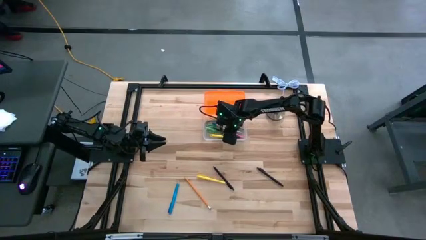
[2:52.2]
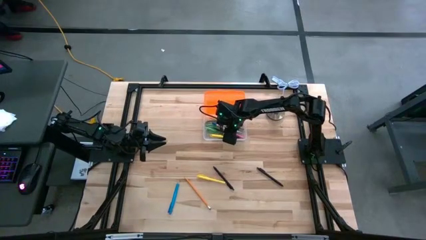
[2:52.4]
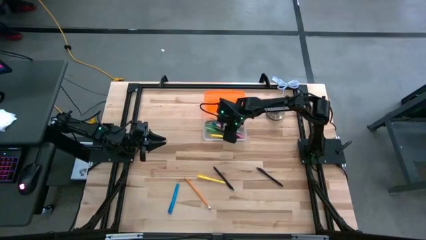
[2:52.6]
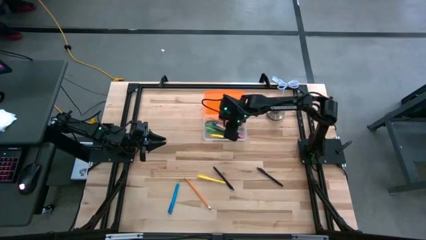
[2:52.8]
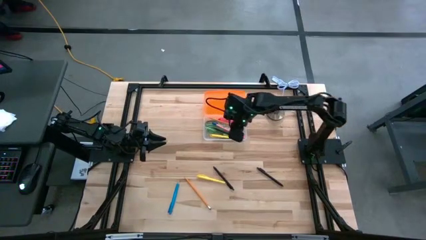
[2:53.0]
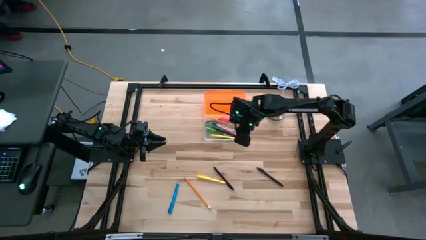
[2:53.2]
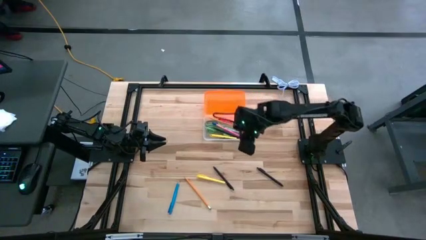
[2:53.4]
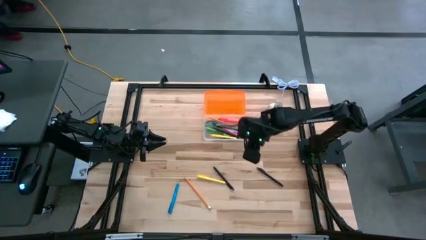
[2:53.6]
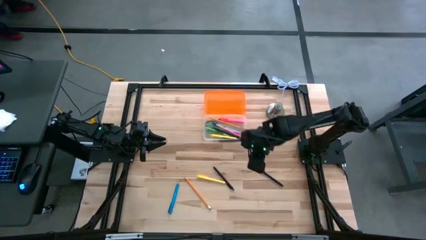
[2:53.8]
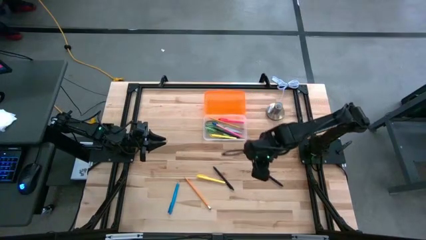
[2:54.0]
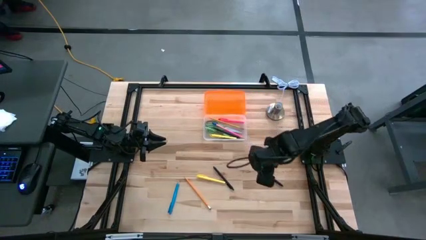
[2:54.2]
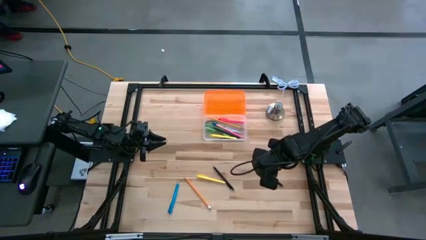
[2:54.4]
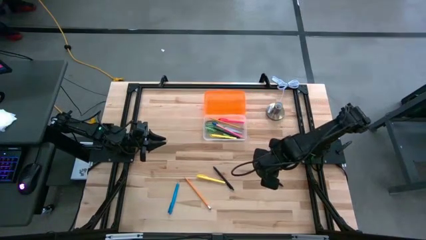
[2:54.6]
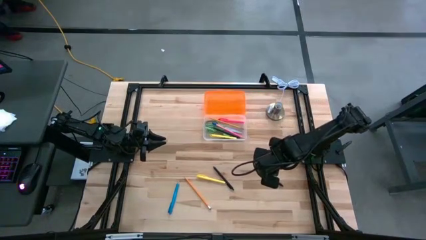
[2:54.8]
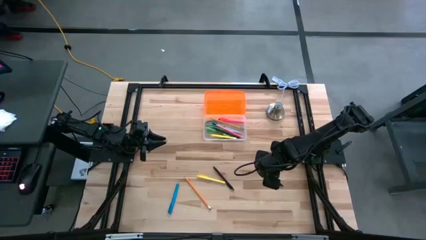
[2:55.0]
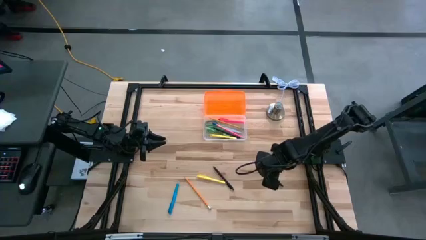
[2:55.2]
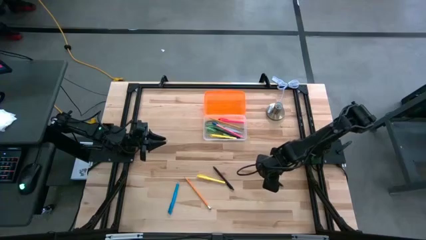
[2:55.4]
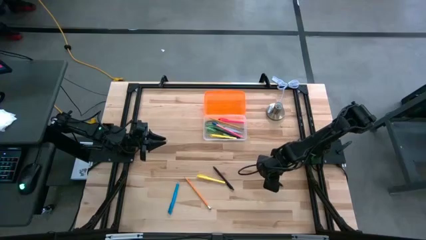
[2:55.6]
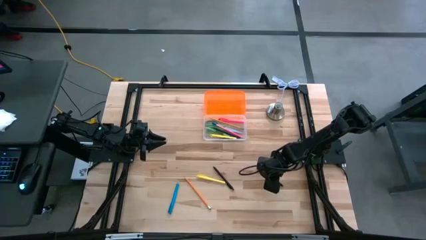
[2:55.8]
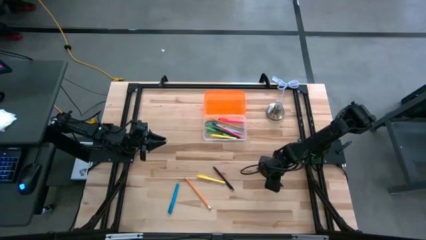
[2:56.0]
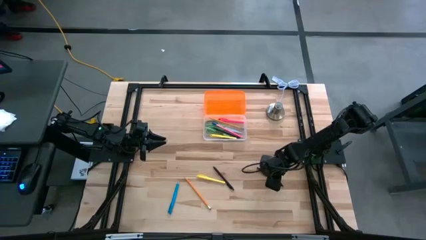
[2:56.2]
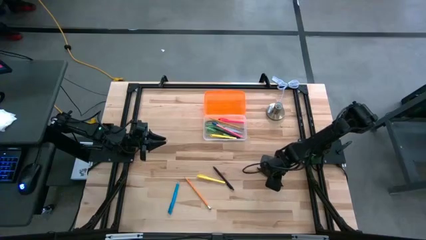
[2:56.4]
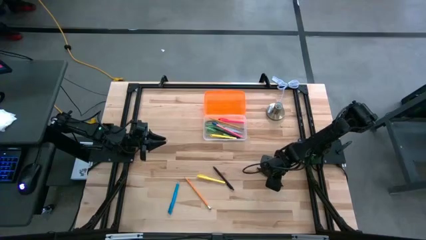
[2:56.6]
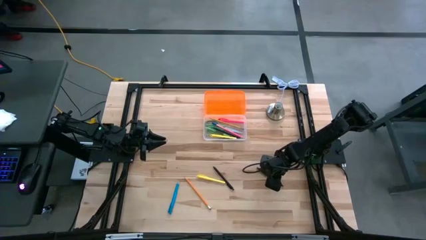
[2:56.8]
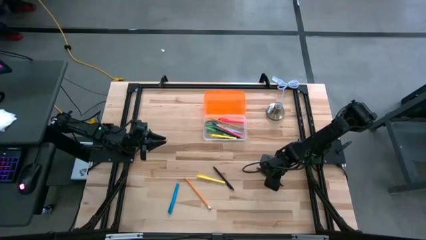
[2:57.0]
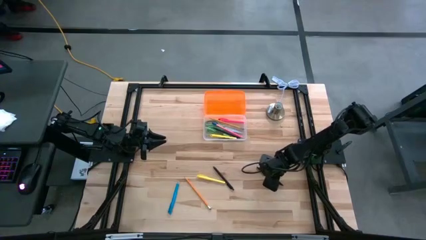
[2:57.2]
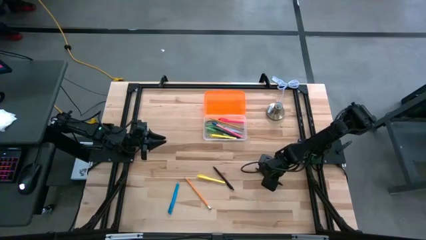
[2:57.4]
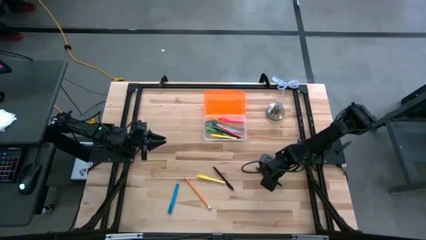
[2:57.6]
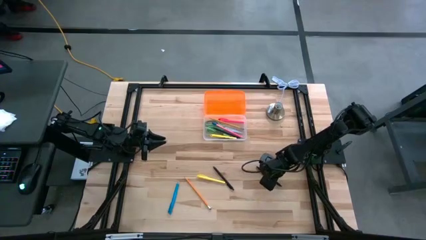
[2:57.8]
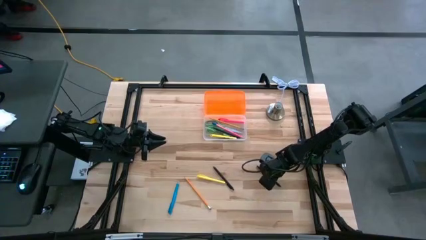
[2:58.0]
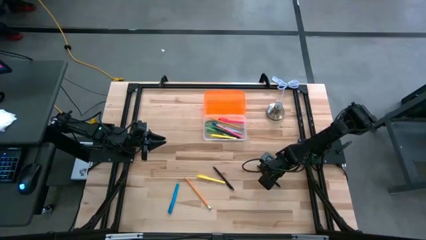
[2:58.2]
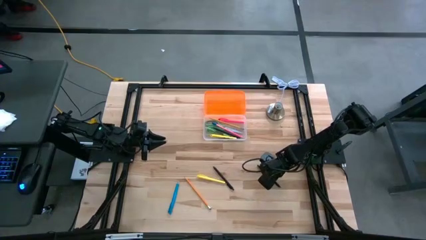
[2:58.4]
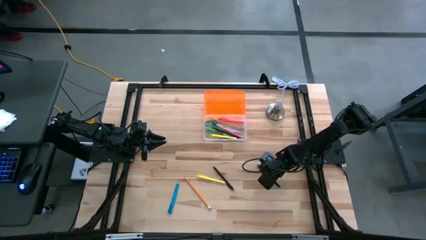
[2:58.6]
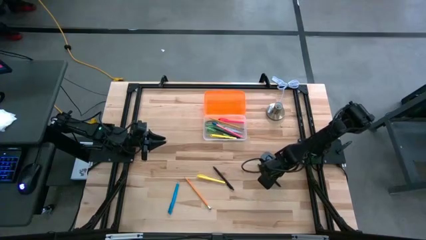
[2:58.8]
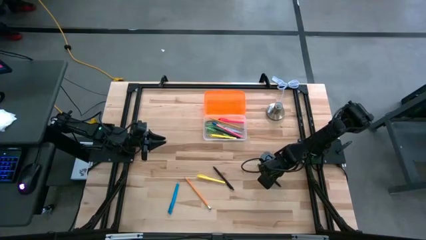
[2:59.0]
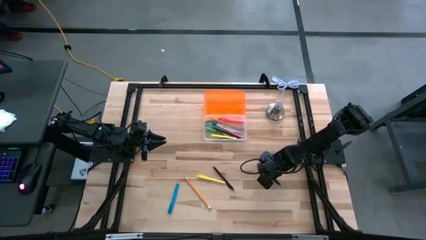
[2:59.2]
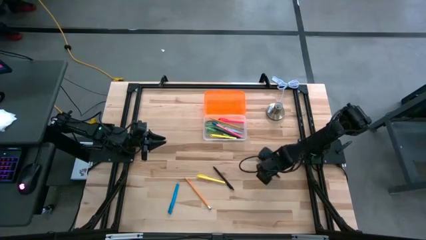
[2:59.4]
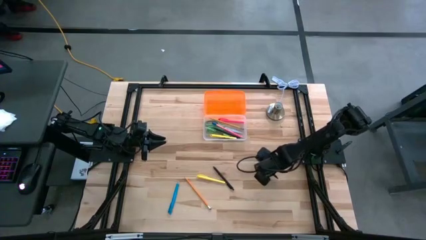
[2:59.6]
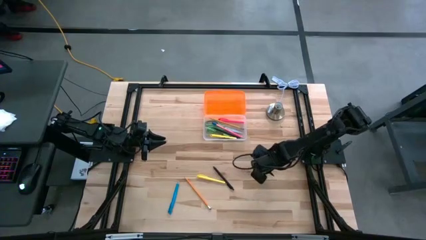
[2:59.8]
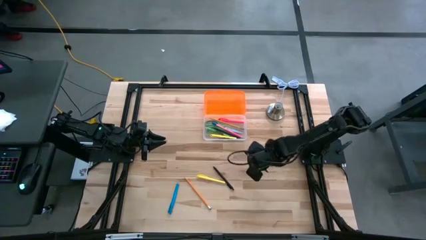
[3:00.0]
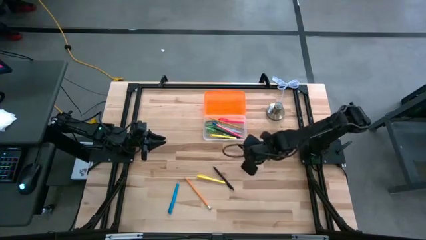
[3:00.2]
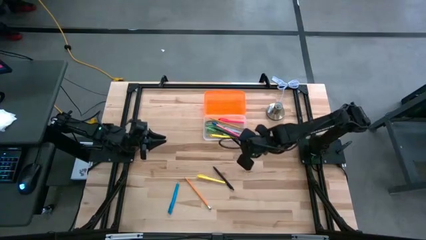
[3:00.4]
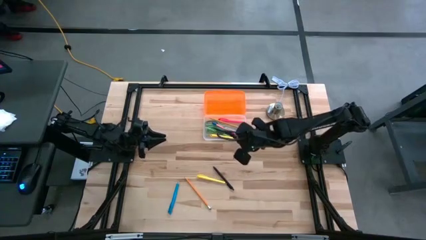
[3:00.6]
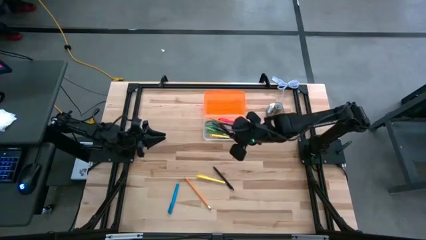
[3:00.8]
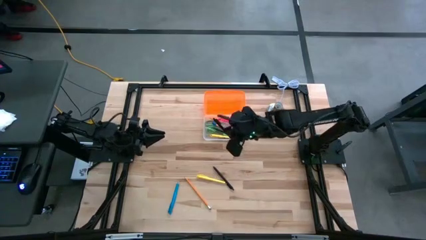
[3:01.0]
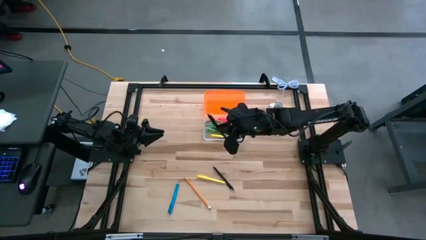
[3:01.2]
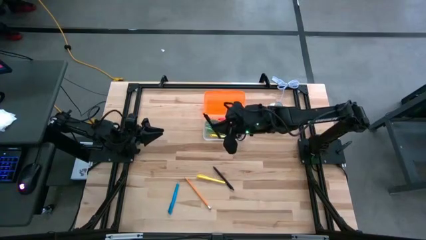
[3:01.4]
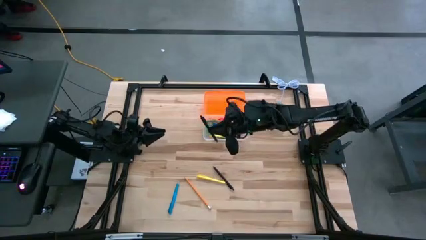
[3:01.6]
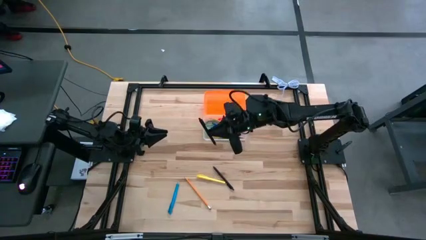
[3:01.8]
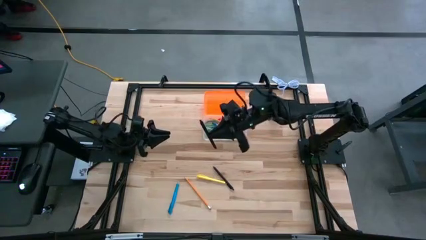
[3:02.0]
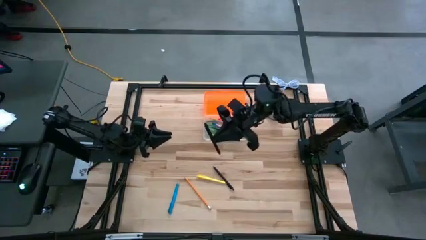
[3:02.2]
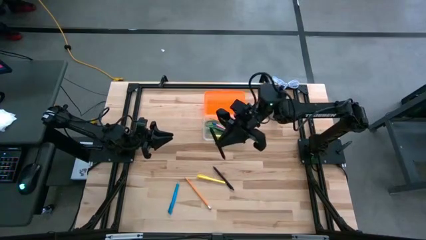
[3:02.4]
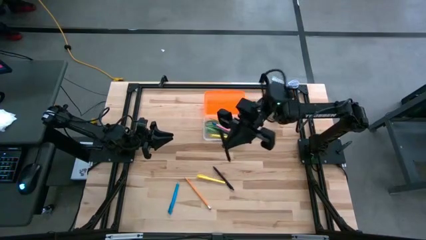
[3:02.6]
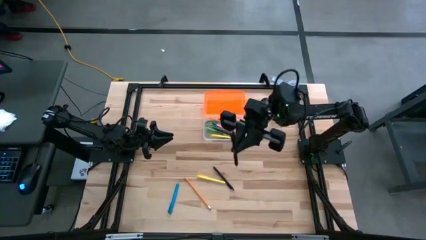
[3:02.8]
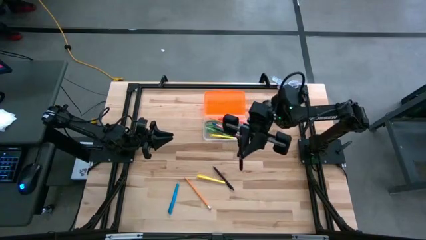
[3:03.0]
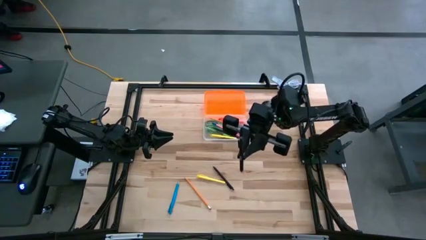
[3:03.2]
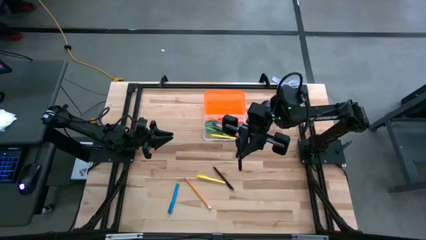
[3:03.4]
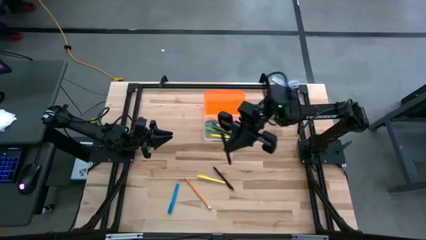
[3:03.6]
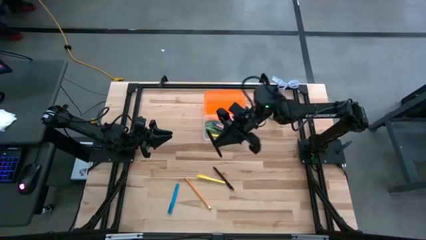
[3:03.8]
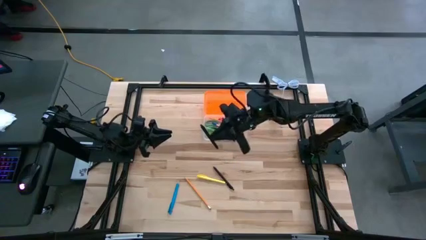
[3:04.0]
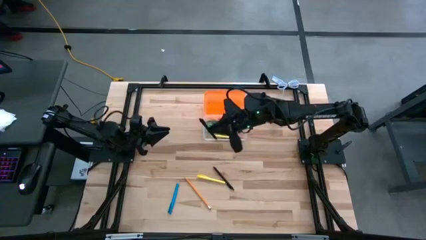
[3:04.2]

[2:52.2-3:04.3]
Task: Pick & place school supplies into a supply box
Put the right black pen into the supply box

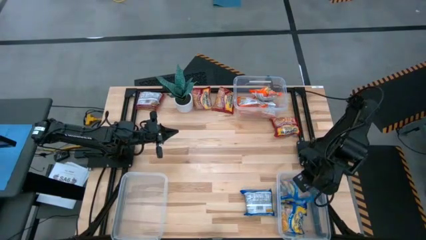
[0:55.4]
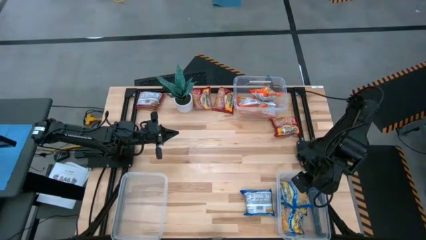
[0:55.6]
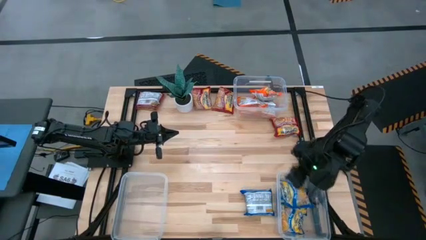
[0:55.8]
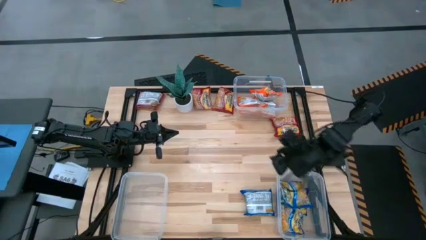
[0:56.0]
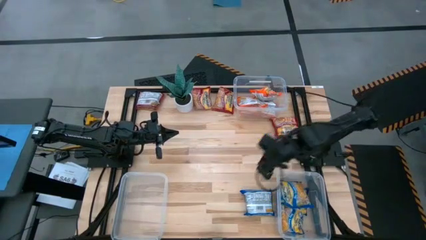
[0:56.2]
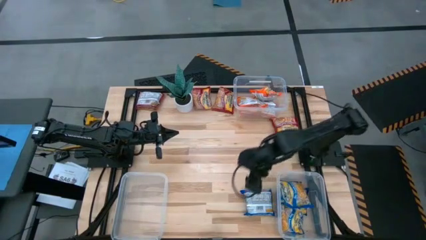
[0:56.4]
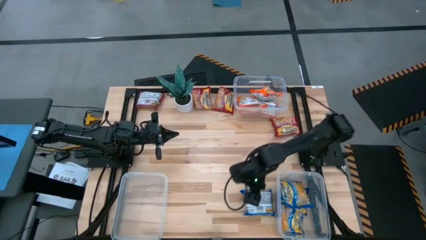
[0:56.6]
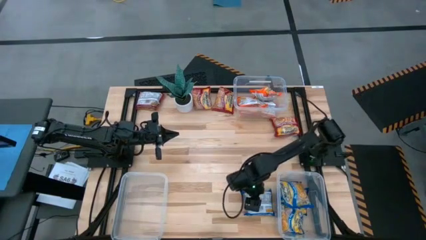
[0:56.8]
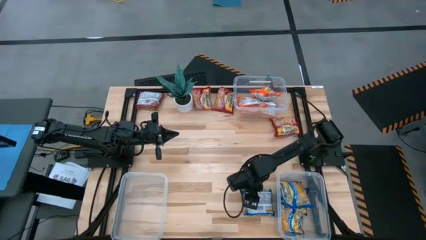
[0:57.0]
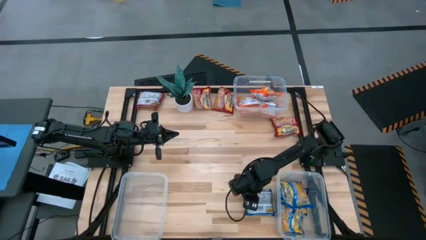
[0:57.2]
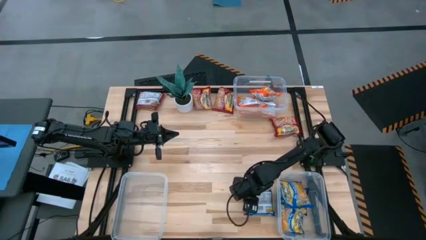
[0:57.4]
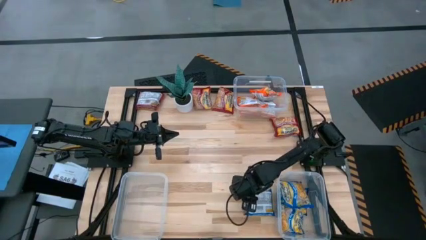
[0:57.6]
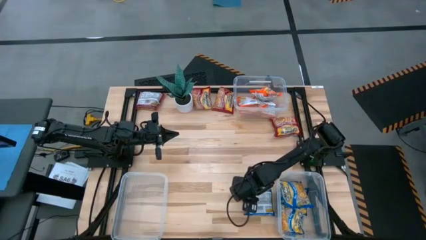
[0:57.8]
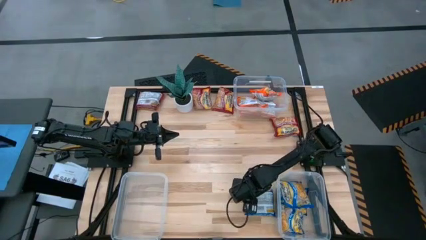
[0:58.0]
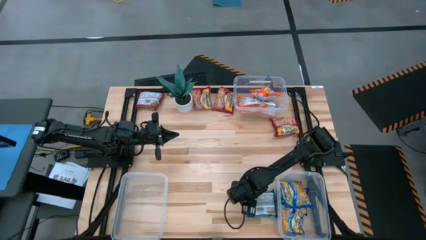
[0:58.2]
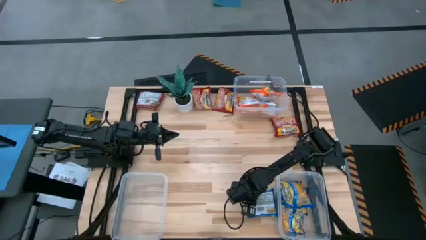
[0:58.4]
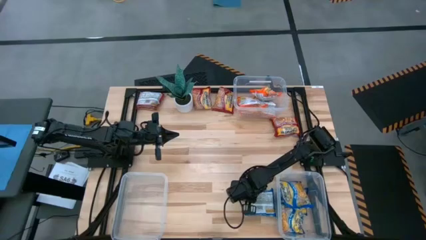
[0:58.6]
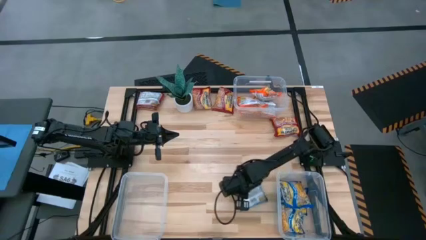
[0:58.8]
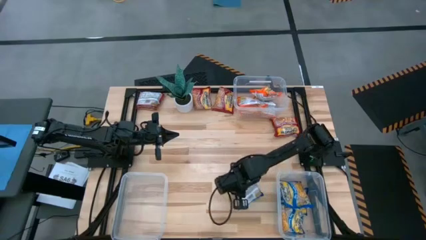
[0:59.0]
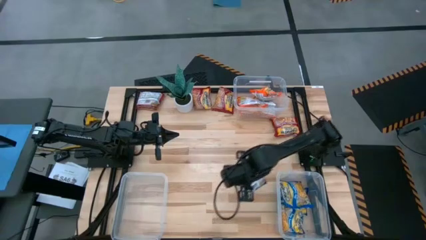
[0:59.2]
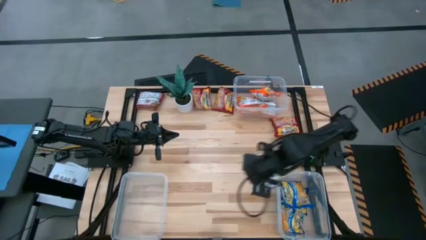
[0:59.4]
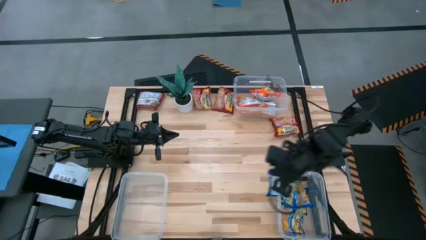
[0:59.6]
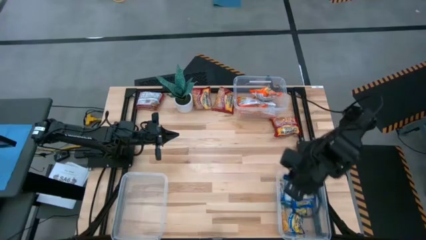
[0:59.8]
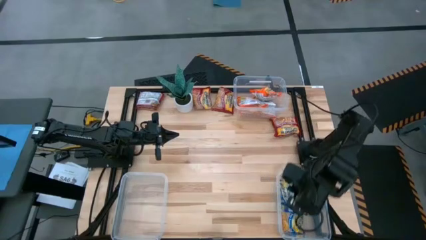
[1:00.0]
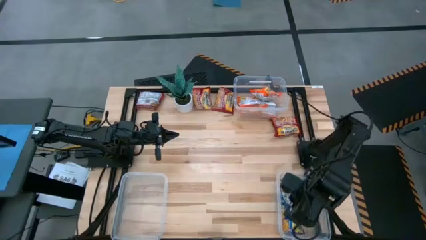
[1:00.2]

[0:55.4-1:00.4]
Task: Sort Maruchan noodles
Put the blue noodle pack into the bottom right transparent bin
